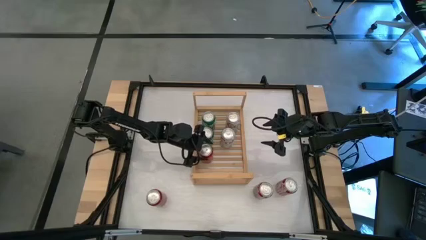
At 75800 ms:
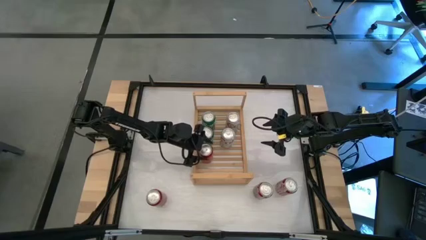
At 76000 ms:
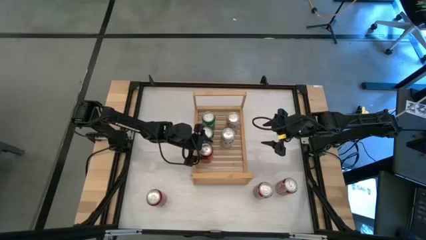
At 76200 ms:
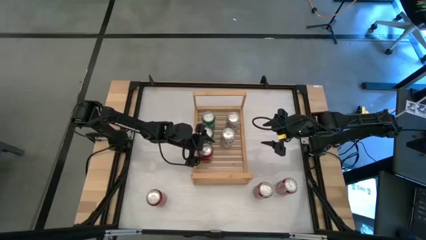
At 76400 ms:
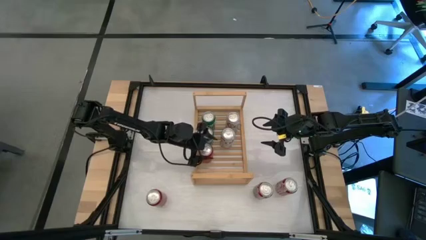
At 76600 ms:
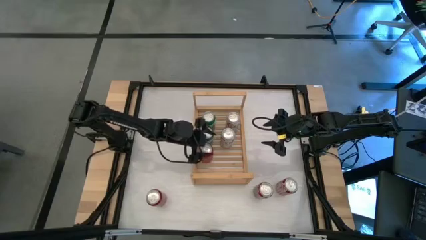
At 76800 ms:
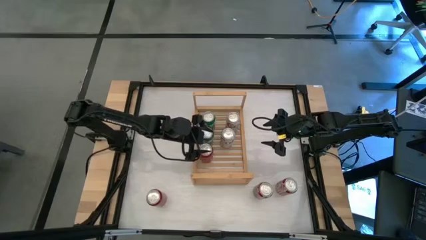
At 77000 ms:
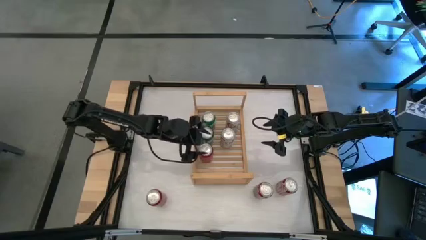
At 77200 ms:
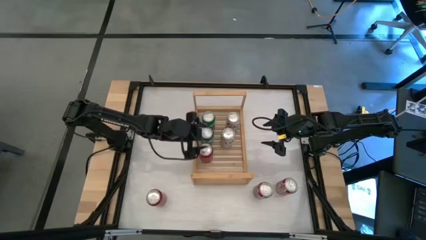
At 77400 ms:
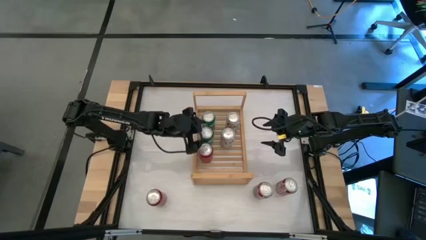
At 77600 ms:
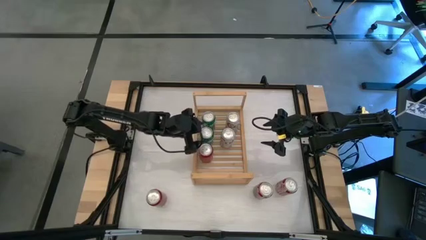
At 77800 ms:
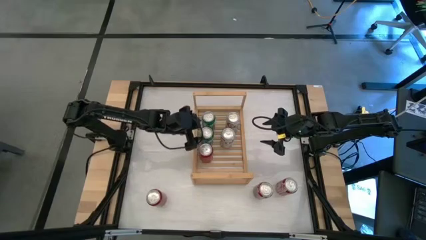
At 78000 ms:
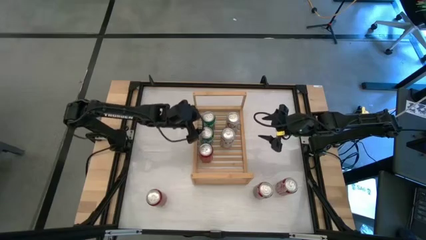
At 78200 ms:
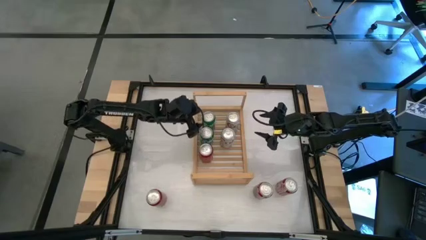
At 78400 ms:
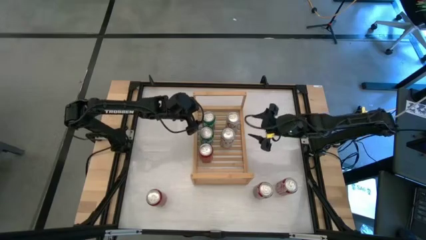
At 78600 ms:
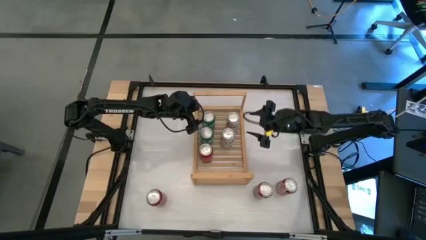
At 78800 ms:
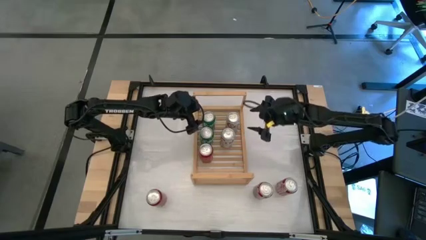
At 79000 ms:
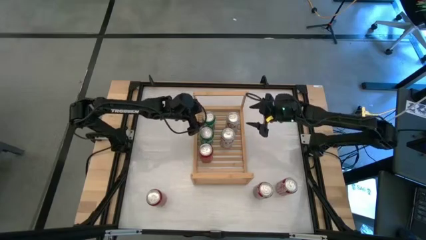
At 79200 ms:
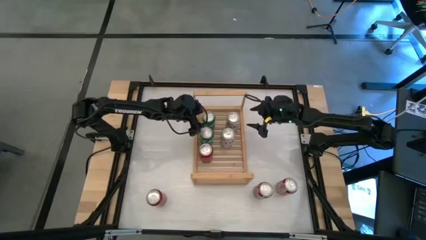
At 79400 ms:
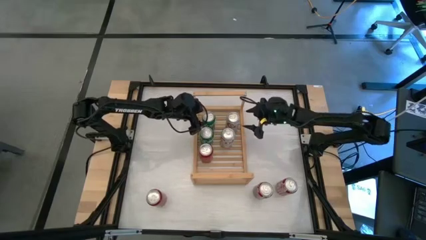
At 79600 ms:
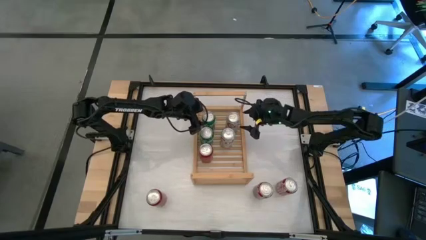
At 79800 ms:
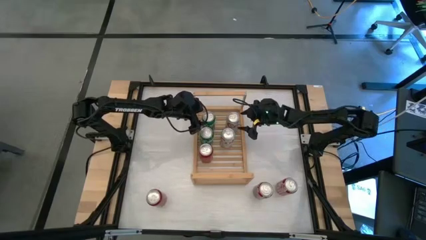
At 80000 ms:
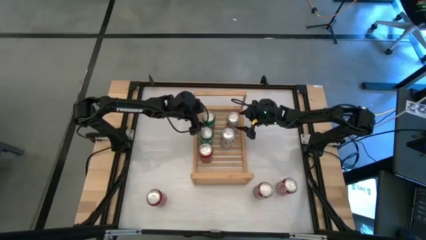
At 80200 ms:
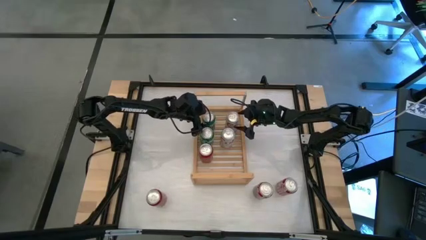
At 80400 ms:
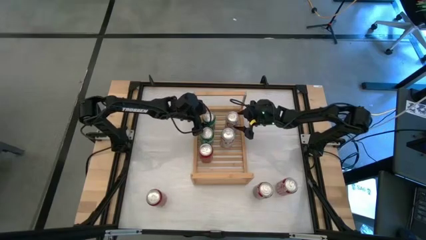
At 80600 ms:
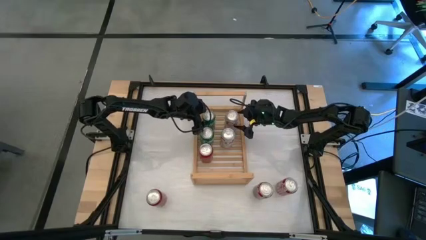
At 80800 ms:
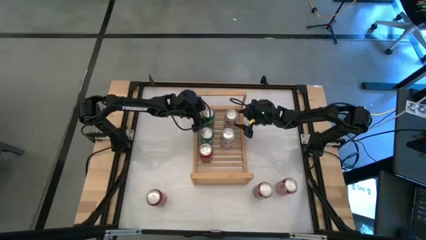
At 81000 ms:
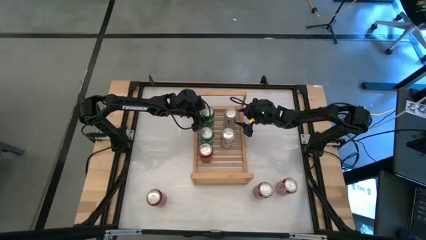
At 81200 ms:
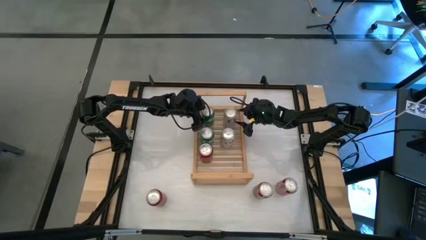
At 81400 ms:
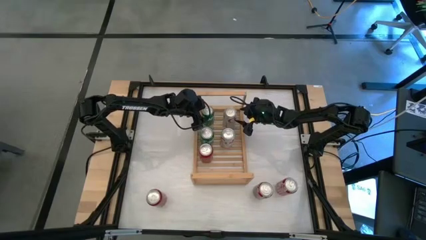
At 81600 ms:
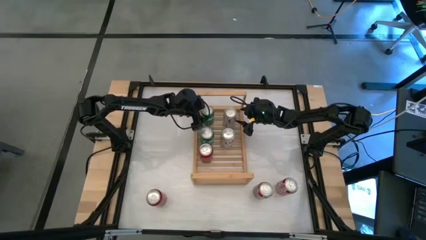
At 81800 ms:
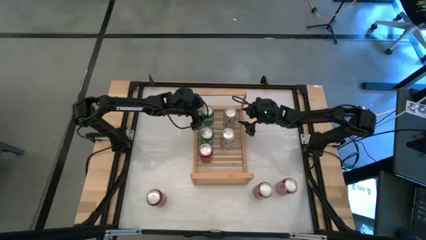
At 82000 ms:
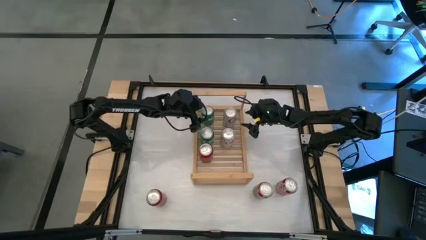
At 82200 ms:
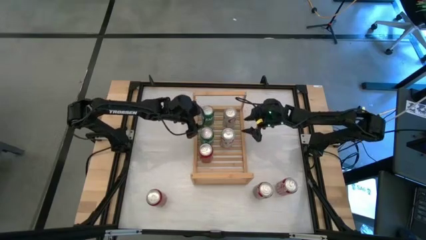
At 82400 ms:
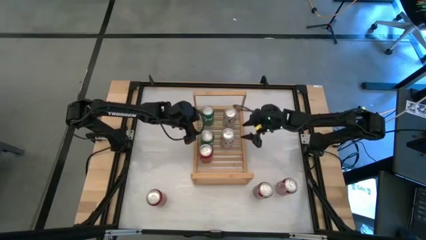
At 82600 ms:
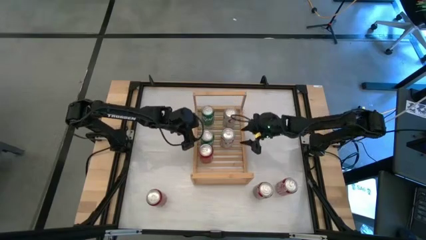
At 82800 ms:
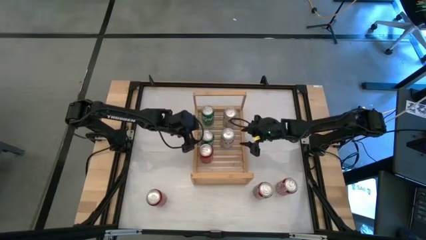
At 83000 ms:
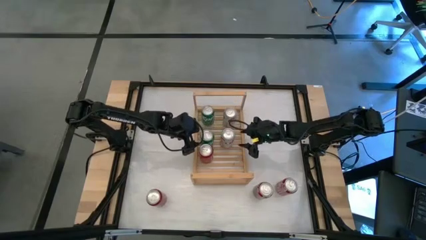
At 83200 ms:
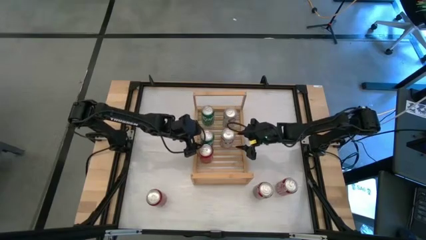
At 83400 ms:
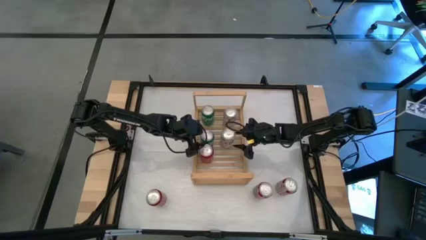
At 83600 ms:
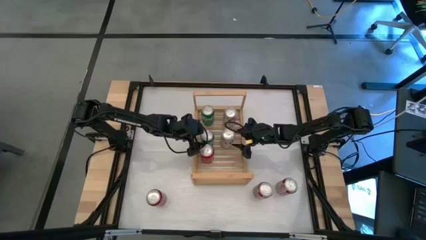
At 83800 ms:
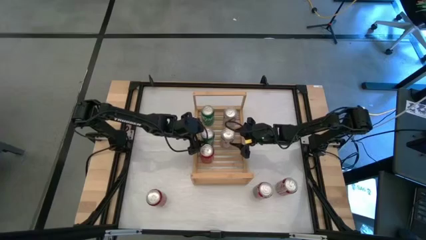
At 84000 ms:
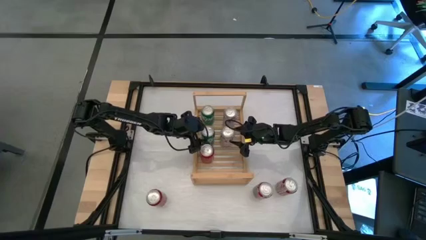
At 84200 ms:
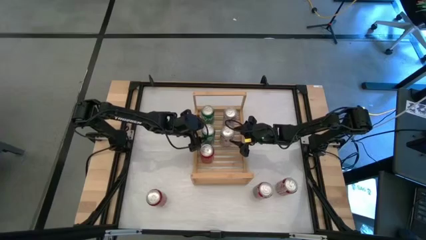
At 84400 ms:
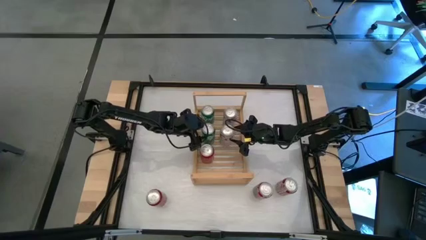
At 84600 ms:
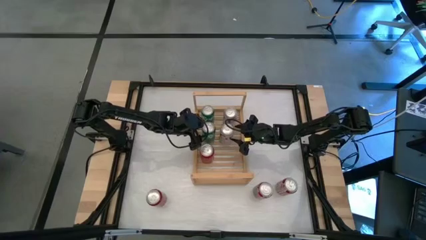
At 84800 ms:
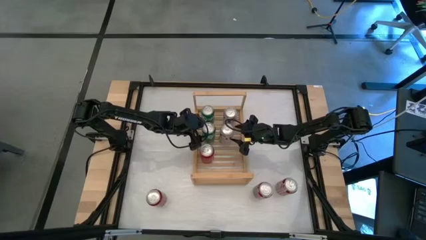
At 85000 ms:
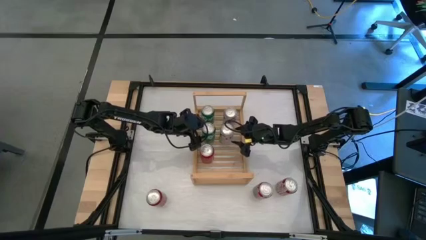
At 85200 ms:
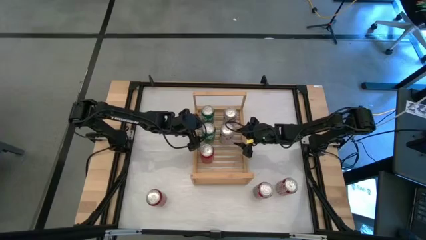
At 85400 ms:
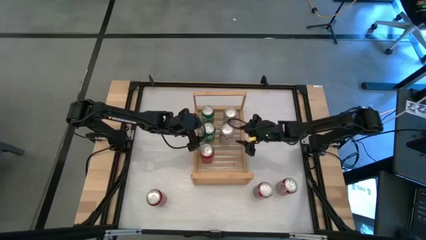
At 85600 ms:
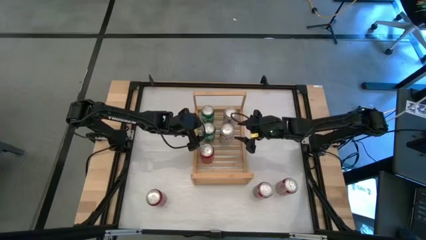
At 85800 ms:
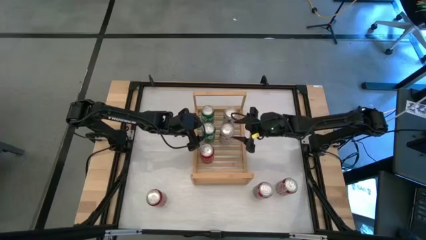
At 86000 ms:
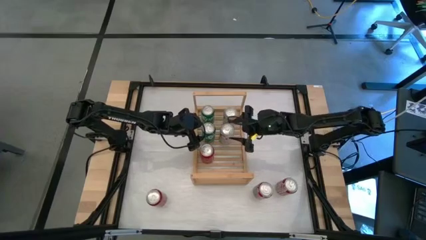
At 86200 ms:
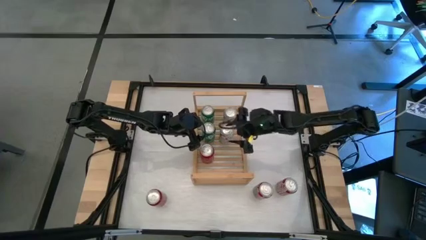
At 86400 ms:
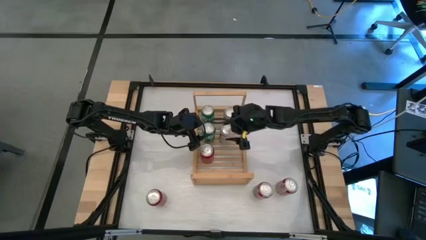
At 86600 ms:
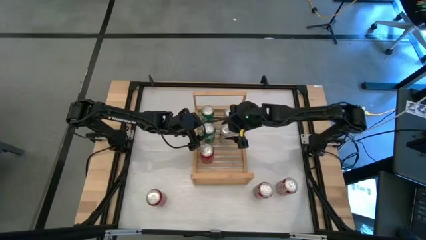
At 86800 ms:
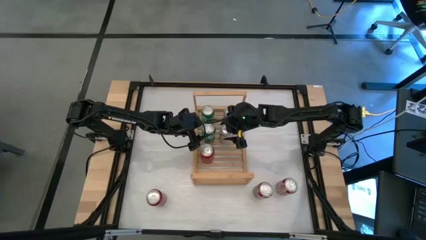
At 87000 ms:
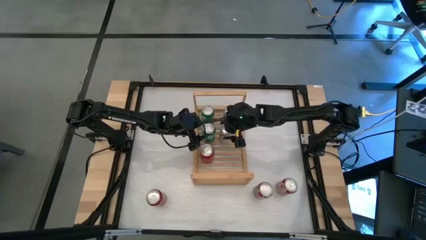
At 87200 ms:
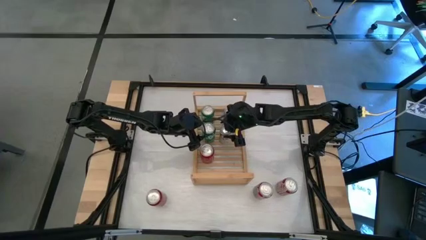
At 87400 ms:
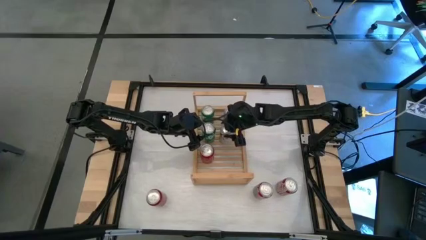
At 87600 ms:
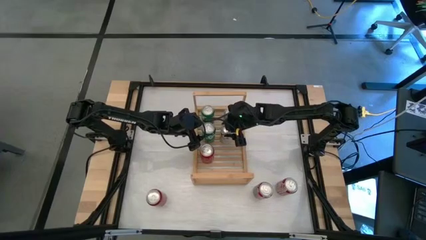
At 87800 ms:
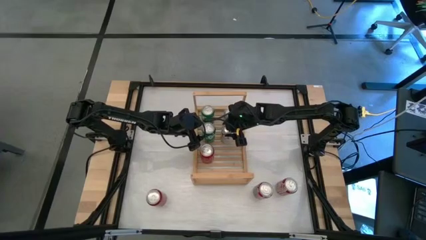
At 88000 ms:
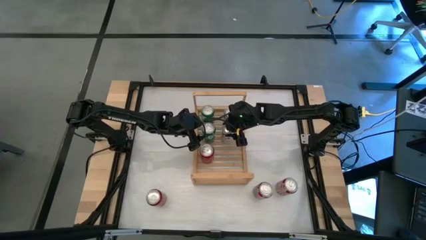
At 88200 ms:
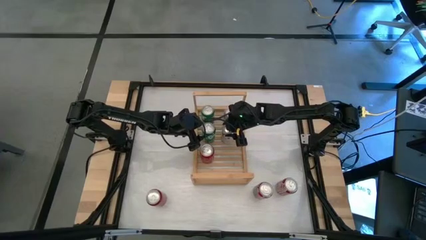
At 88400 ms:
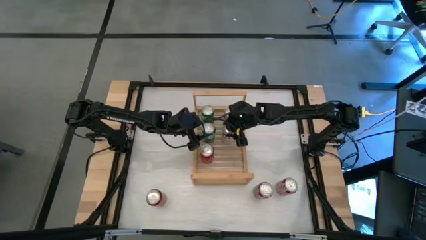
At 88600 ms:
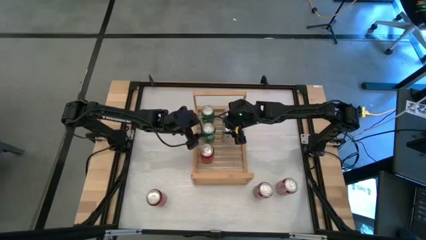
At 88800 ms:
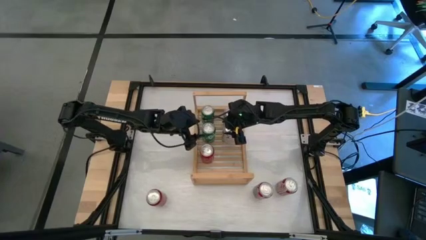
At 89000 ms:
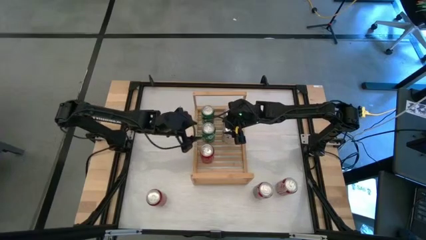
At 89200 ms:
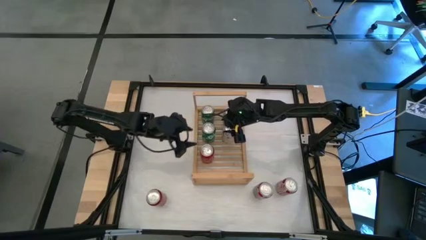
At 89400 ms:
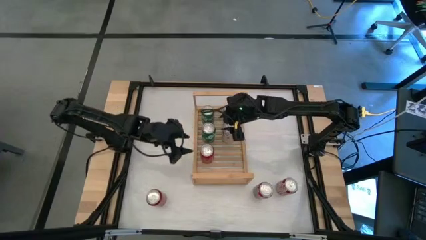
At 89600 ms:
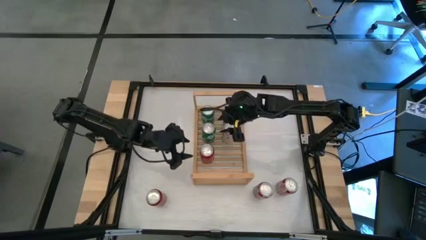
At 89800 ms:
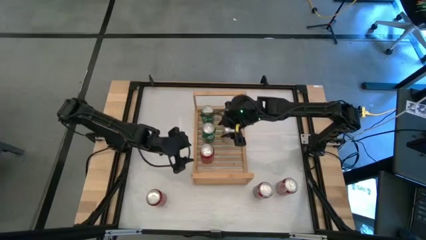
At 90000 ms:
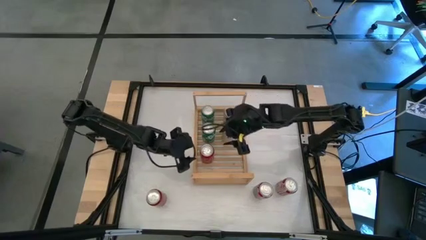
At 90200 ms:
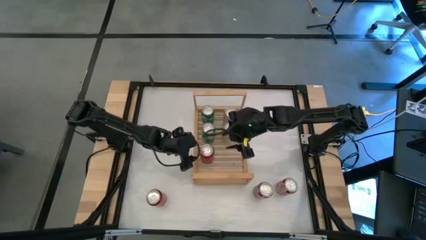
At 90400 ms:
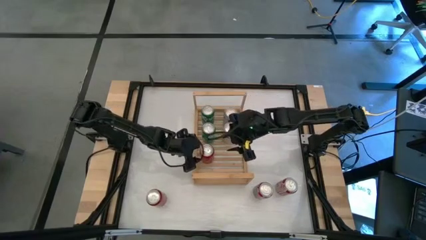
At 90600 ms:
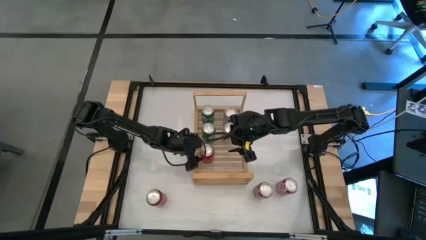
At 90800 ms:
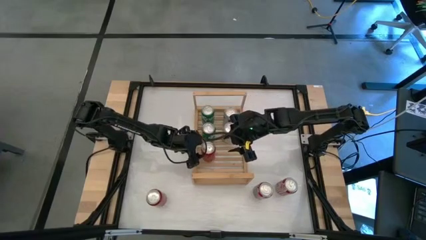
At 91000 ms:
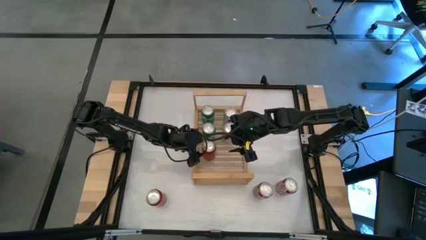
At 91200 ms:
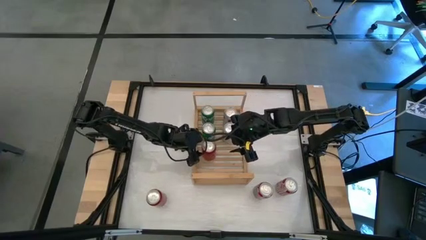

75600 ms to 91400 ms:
Task: Place canned beverage on shelf
Adjust the soda cans on the shelf

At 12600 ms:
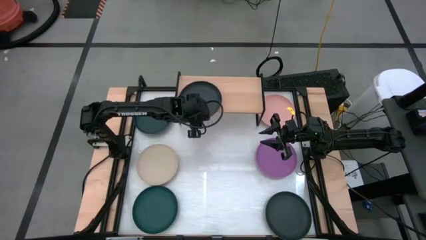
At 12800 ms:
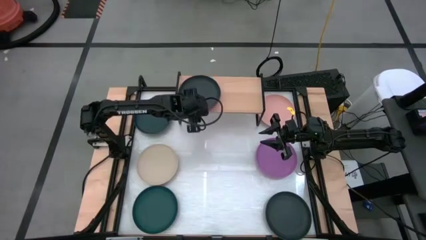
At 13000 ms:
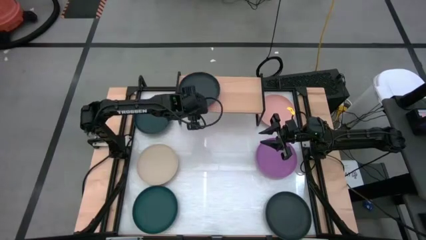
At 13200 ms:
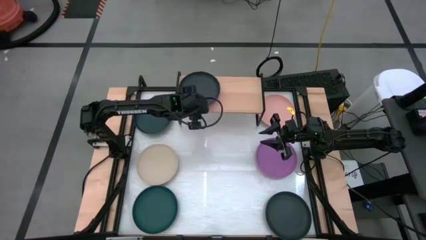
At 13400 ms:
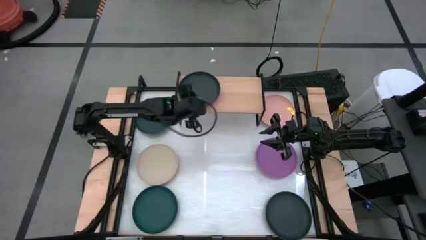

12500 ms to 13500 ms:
Task: Place and stack plates onto a shelf
Adjust the plates
